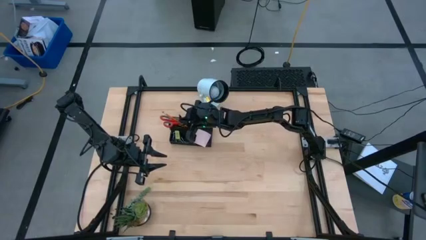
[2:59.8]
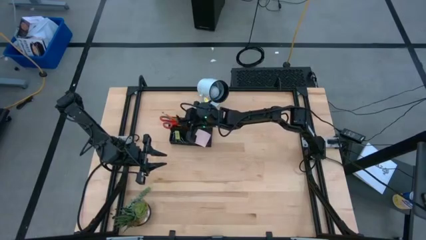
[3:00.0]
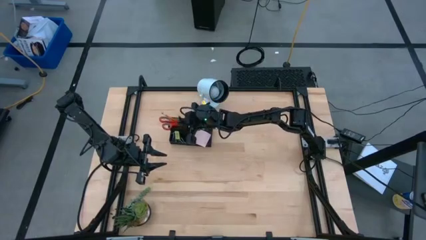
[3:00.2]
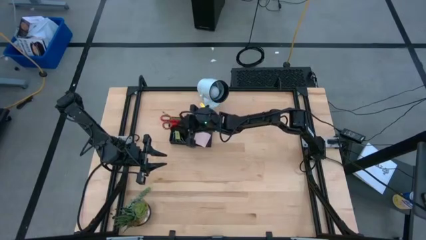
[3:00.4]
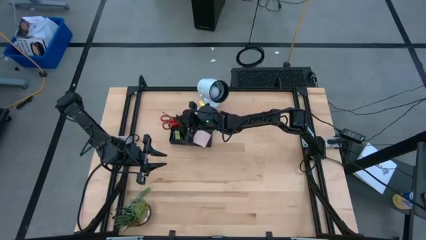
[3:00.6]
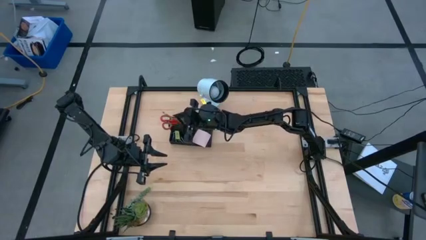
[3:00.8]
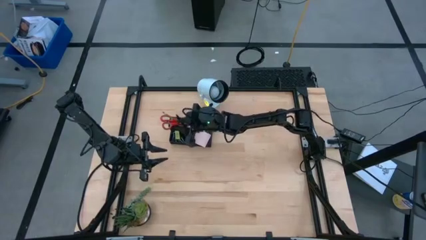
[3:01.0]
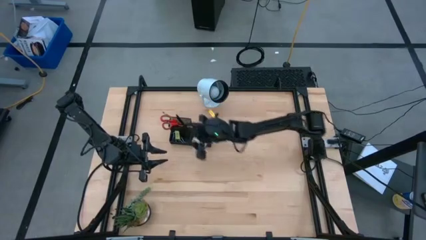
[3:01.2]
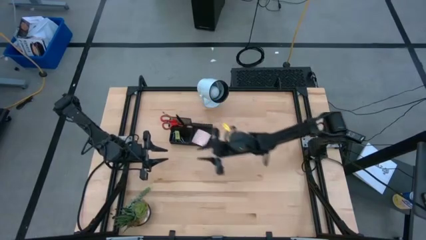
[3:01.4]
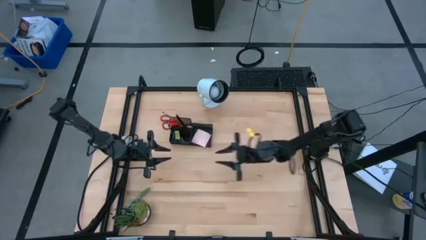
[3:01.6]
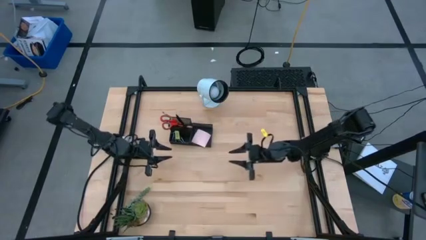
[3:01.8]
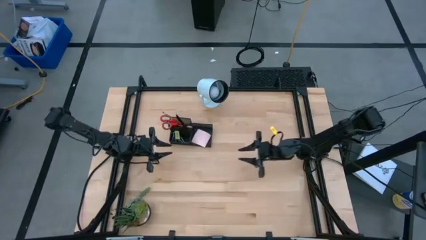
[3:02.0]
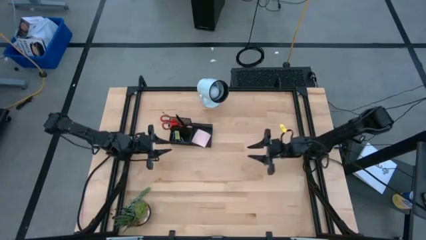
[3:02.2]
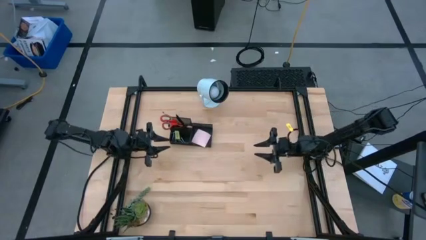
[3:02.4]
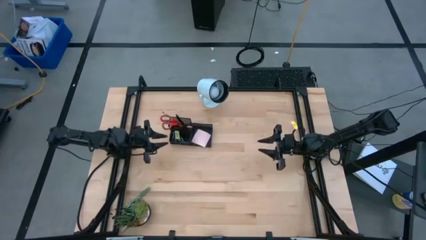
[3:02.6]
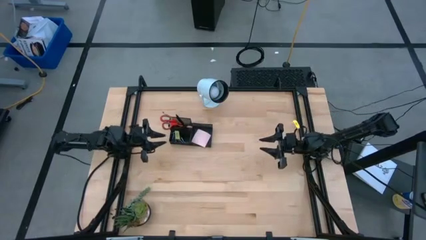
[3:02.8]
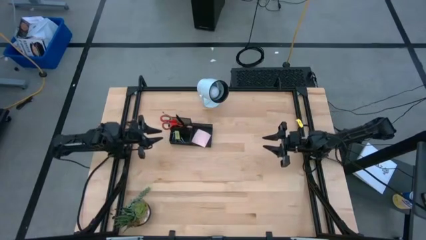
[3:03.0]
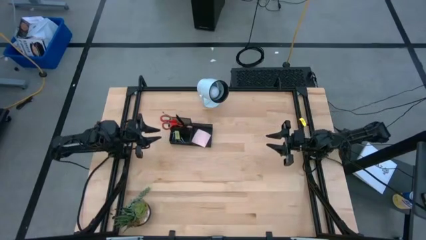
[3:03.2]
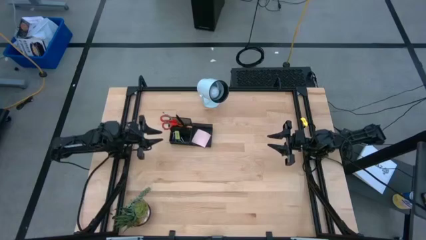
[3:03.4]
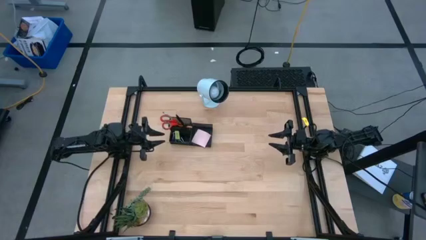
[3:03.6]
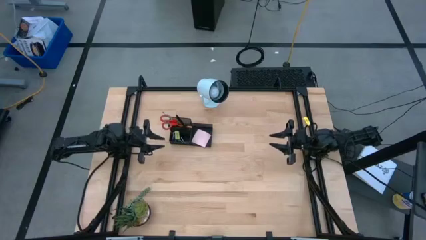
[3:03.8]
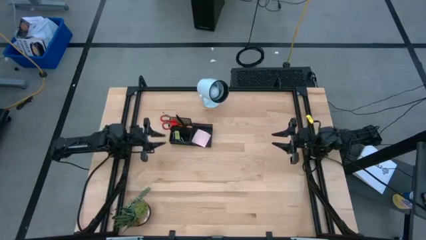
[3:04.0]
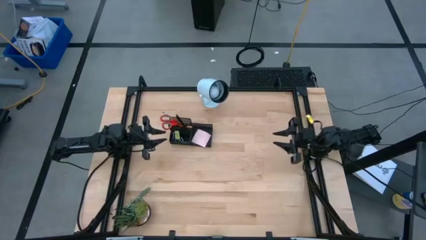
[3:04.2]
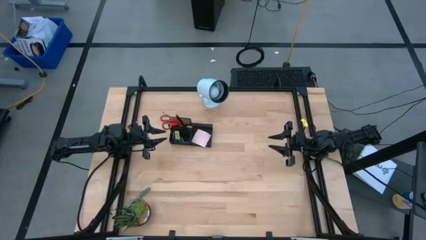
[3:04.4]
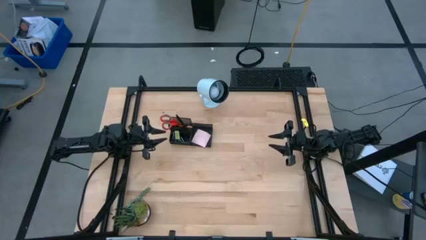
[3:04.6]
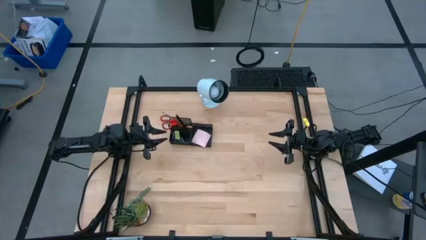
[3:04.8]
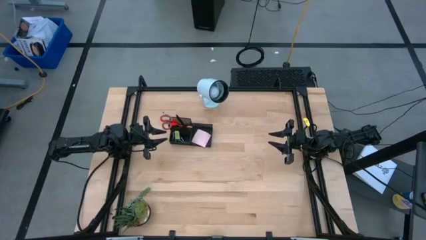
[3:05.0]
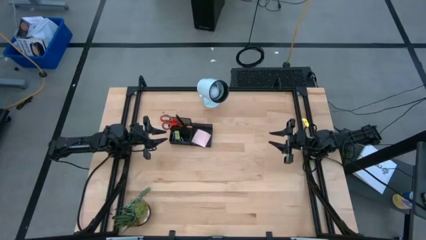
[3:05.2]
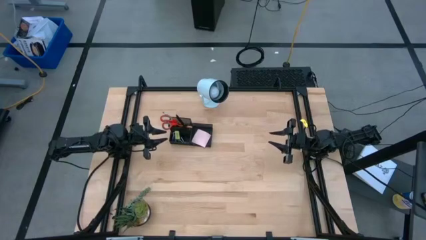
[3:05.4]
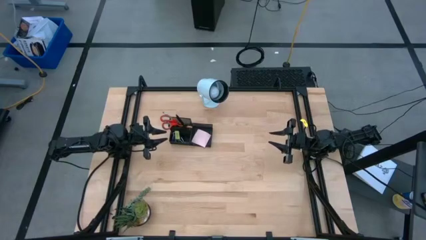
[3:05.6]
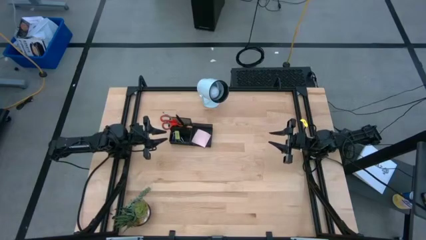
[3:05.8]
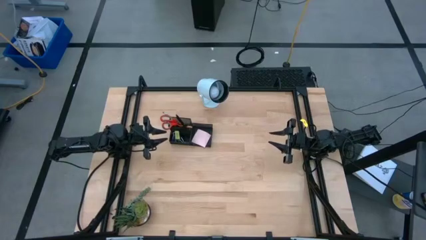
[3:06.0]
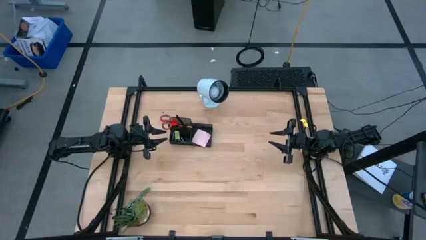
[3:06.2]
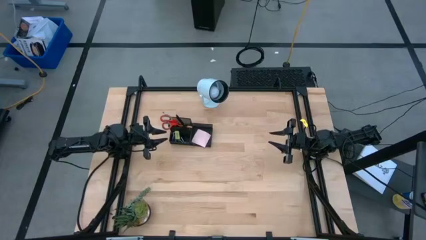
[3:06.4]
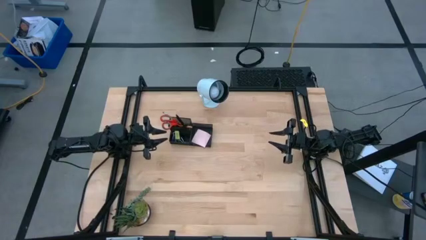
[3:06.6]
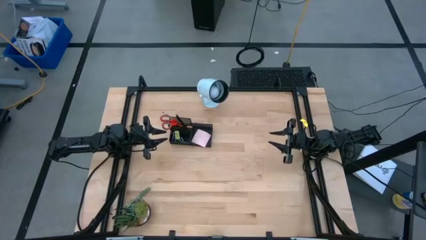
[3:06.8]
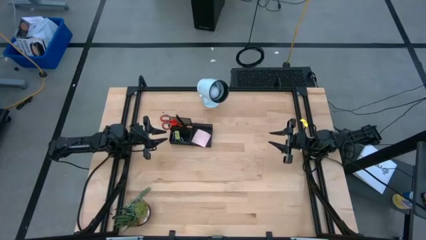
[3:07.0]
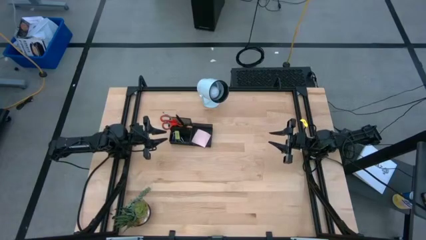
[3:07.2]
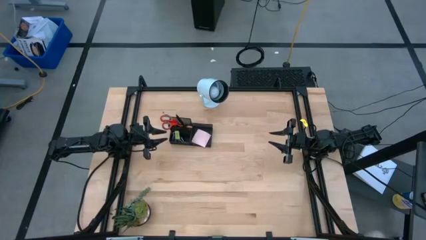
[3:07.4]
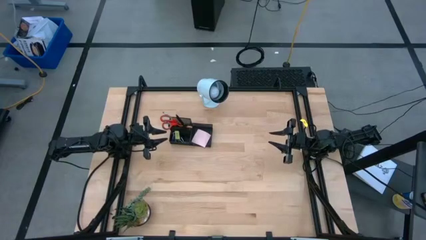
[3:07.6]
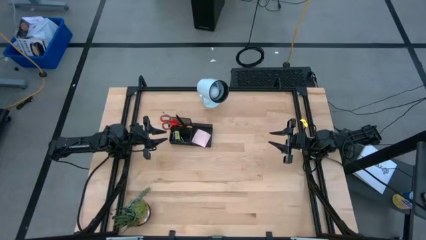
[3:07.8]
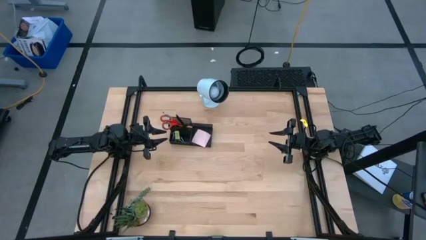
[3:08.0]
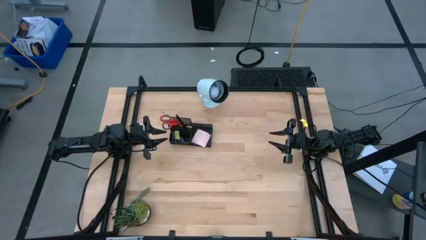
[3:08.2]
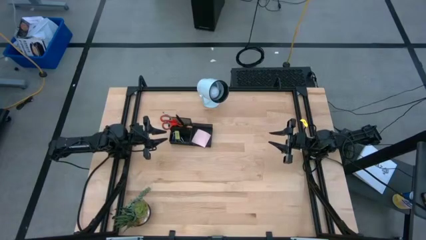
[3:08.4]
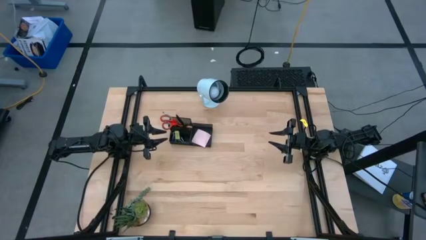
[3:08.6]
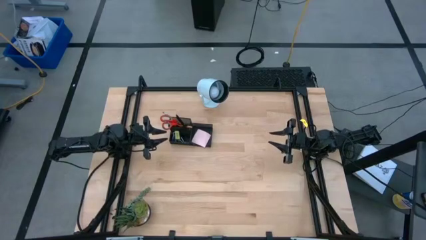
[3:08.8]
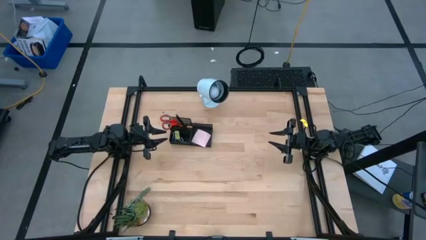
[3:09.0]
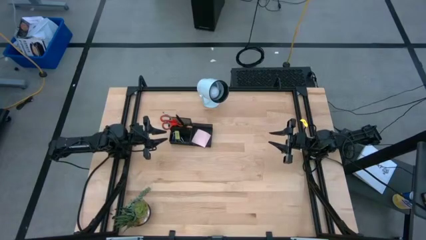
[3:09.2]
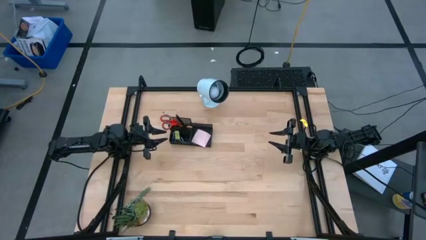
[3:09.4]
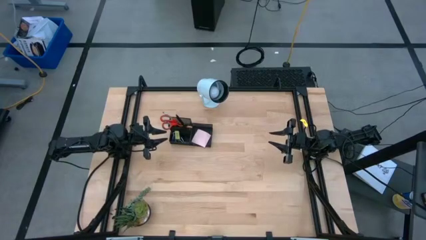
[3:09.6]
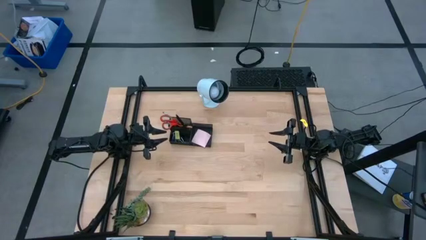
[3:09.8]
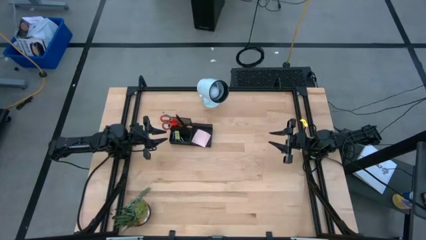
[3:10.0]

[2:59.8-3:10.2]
Task: Pick and place office supplies into organizer
Return to Home Position

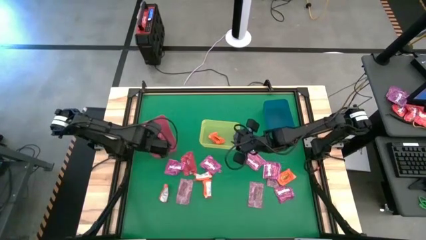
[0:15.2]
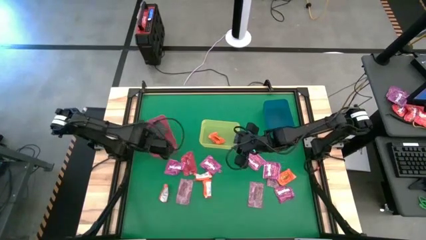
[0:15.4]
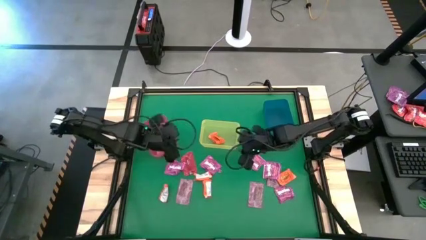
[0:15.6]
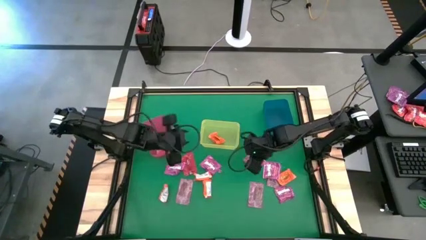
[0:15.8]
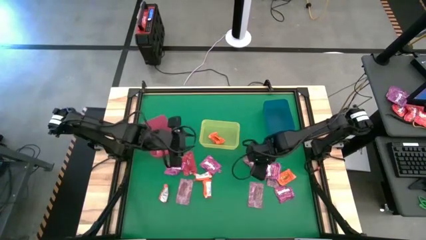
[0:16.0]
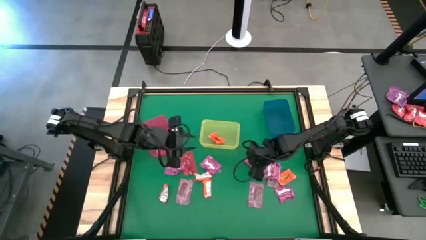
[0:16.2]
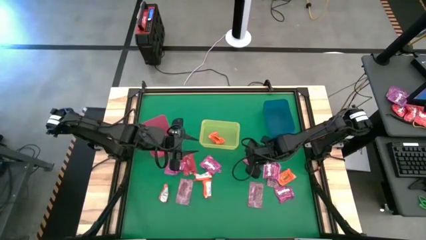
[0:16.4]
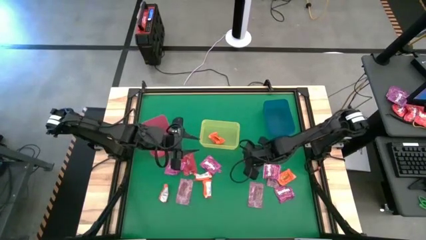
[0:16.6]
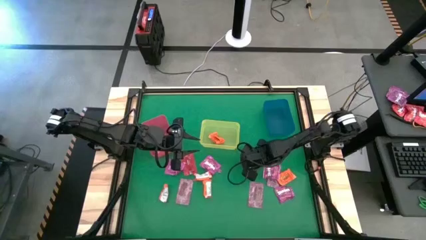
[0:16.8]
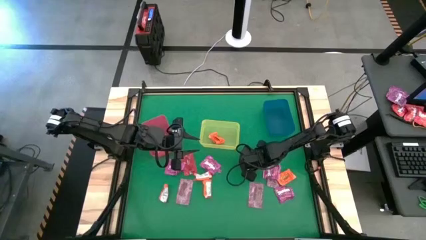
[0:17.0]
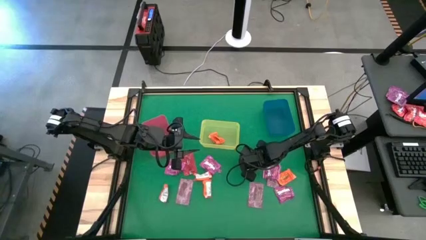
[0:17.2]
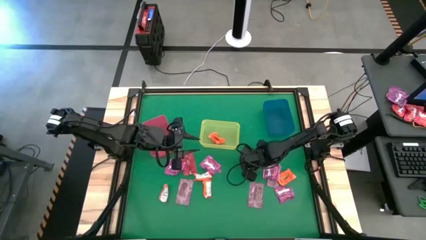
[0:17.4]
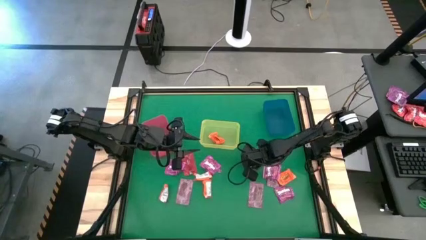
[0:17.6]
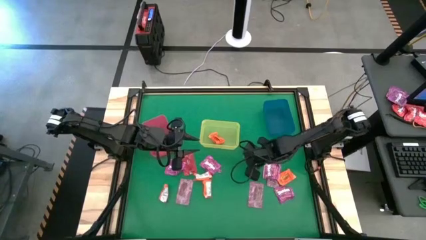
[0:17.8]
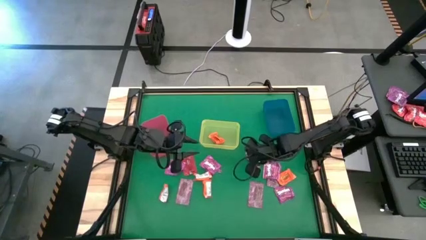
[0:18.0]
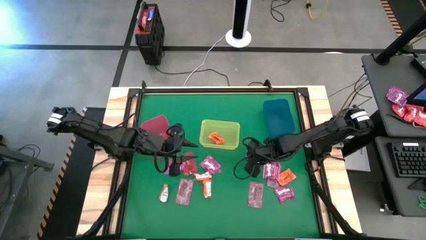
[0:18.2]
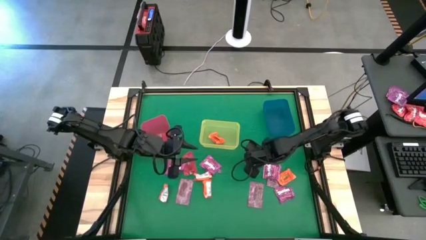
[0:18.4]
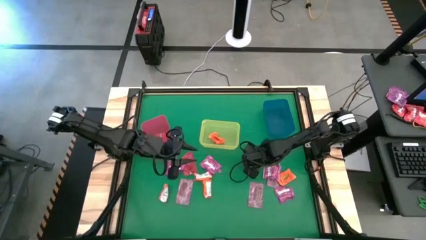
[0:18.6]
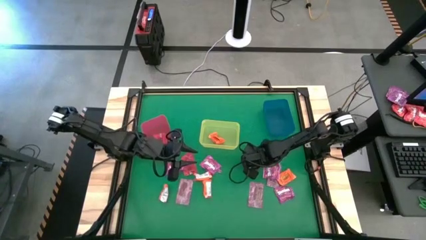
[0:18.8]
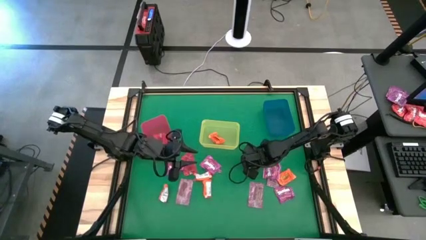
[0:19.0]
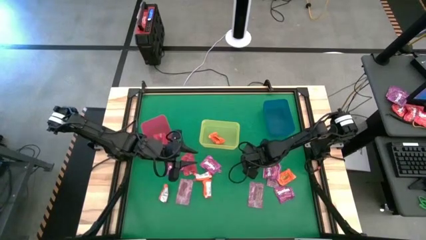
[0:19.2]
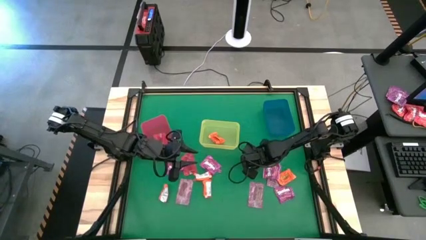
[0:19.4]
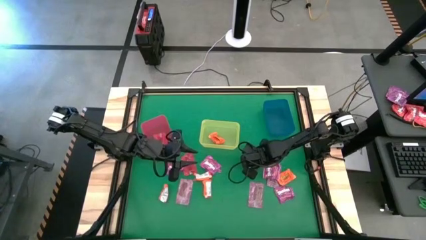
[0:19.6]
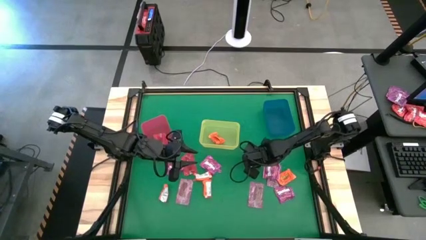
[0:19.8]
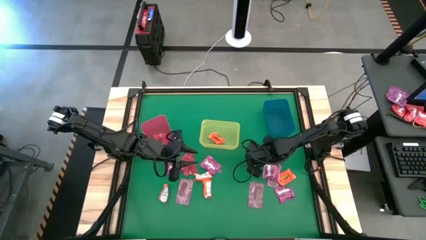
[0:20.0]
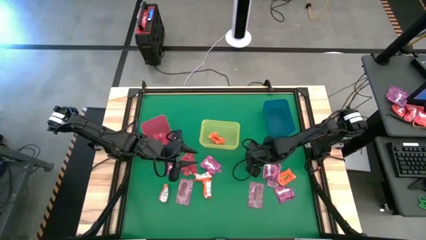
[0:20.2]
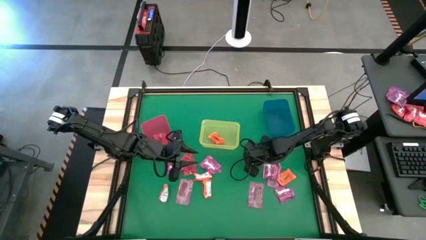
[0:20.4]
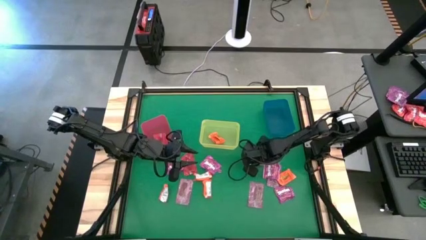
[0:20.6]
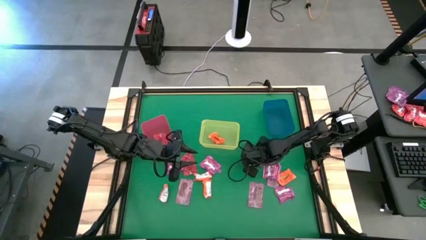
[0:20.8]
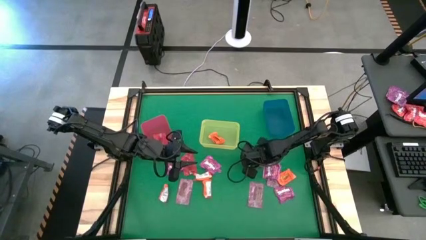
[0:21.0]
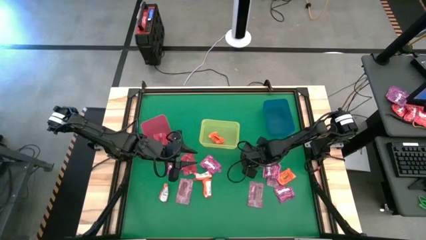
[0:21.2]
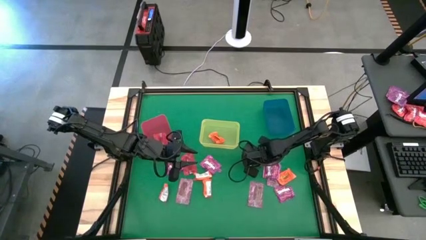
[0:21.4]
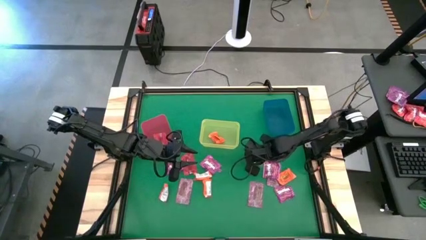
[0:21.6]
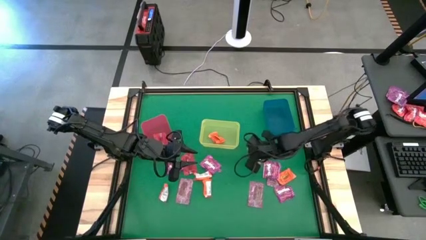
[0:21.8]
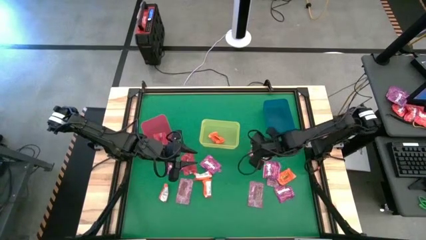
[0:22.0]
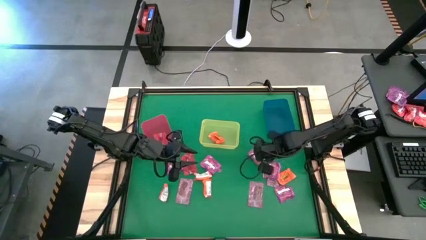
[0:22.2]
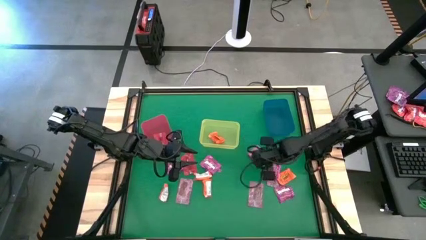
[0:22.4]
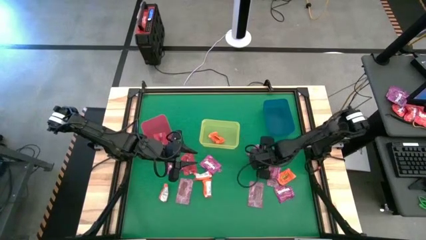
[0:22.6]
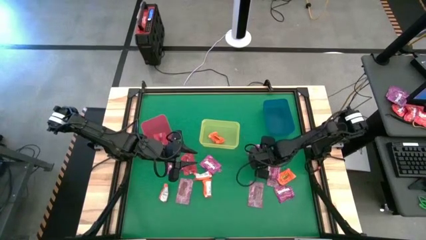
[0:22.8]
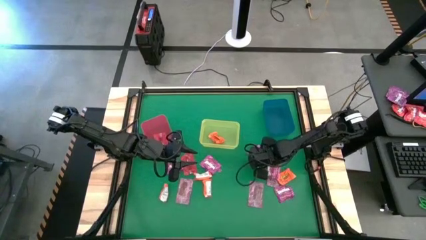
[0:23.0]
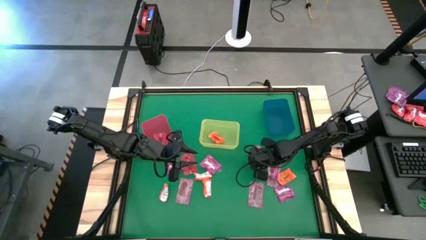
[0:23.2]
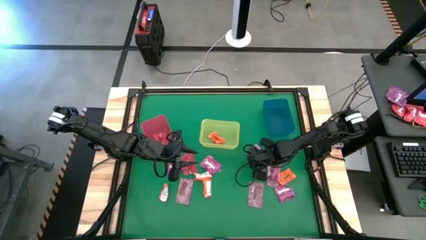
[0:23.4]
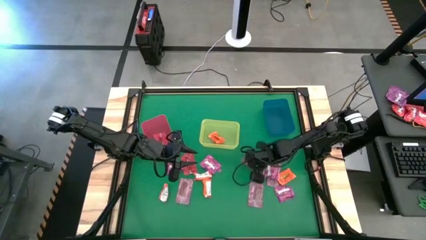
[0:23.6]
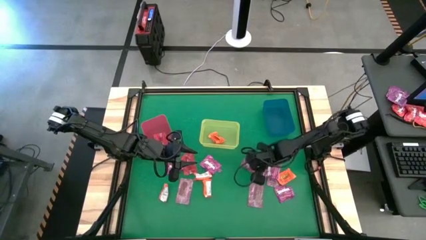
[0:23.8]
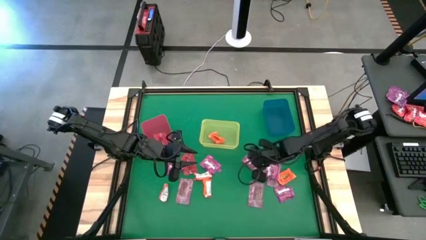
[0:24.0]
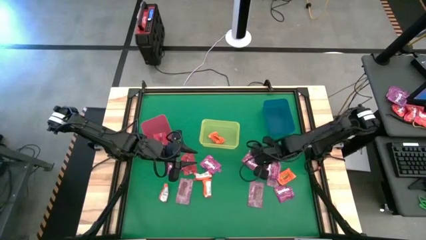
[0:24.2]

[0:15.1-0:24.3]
Task: Sort candy by brand, put in halloween buckets
Put the purple candy into the blue bin
